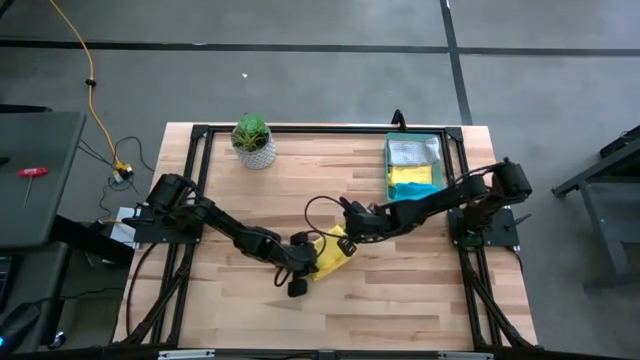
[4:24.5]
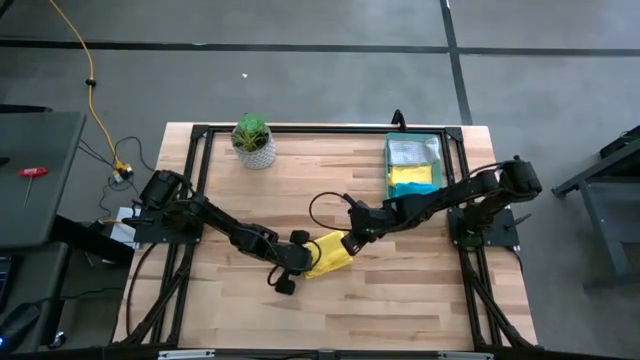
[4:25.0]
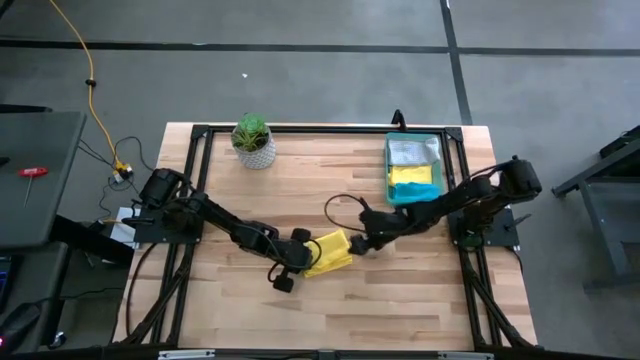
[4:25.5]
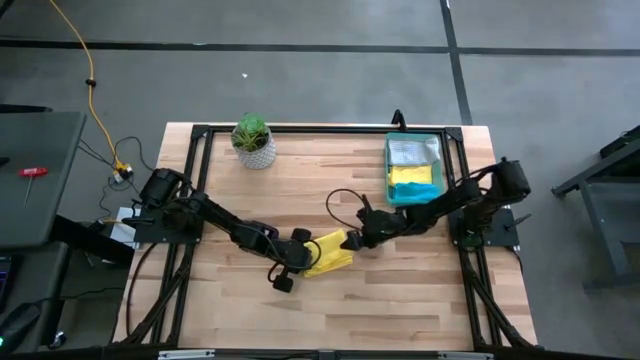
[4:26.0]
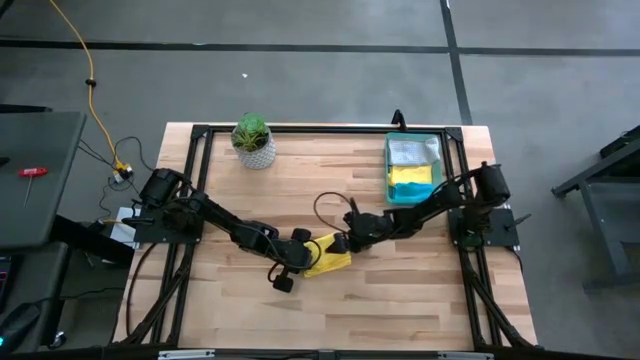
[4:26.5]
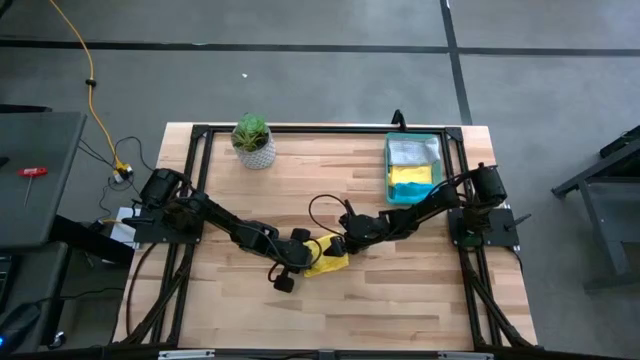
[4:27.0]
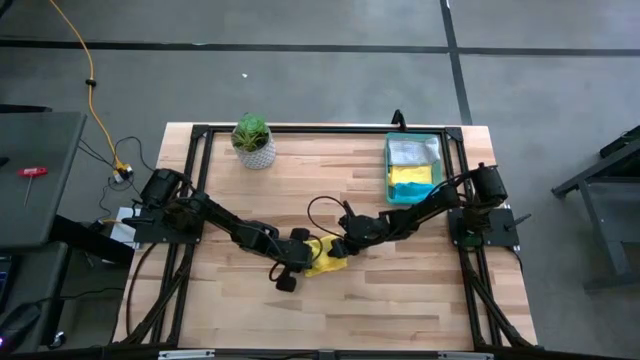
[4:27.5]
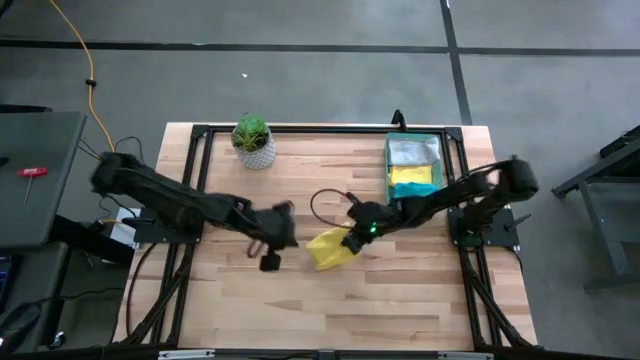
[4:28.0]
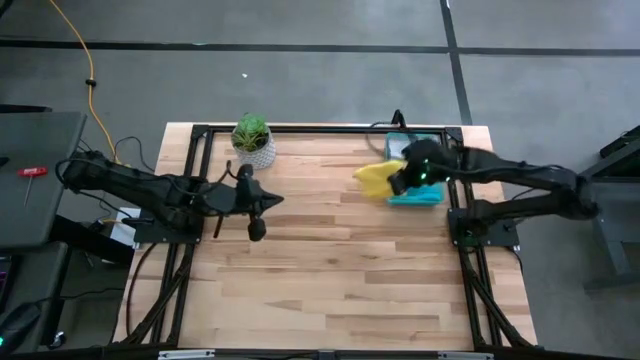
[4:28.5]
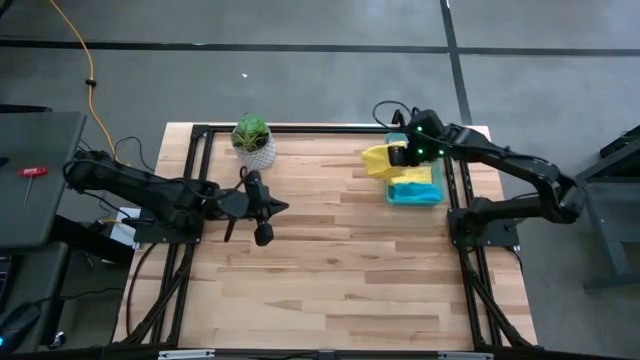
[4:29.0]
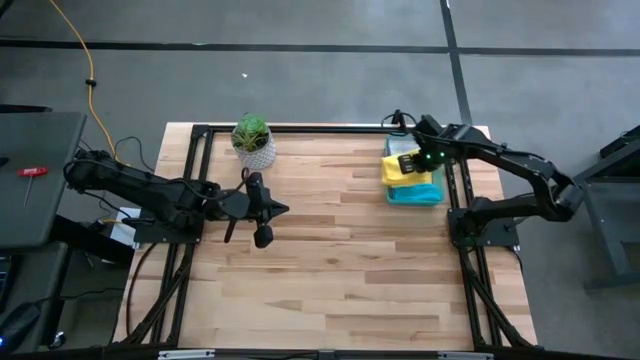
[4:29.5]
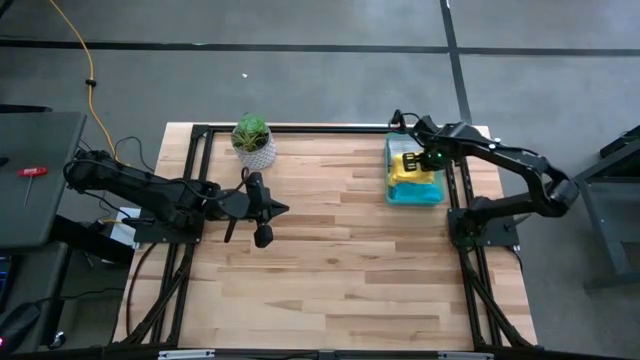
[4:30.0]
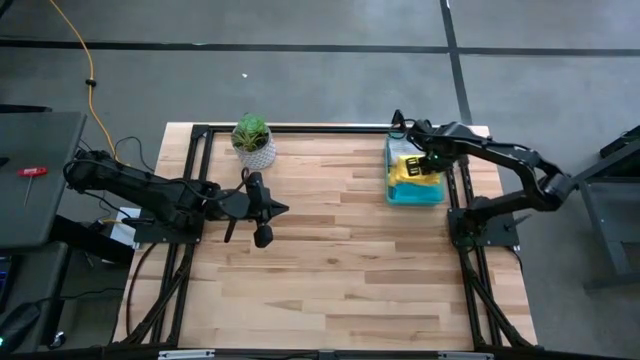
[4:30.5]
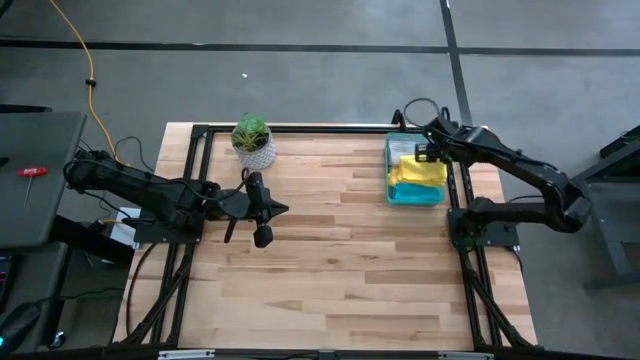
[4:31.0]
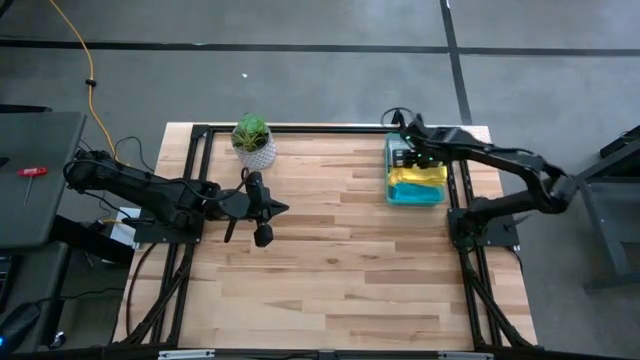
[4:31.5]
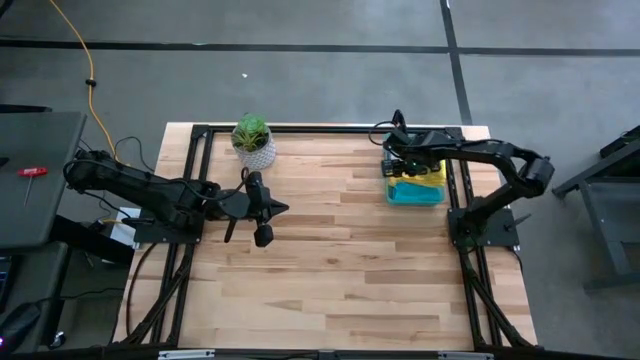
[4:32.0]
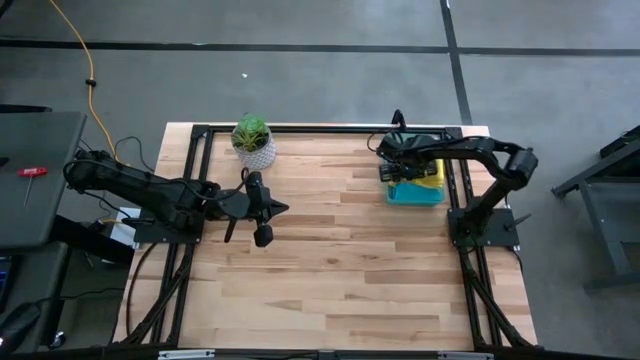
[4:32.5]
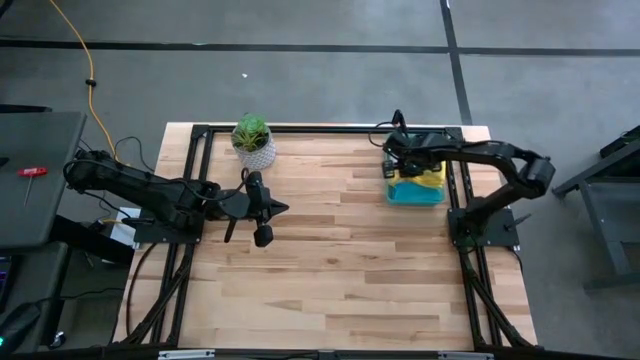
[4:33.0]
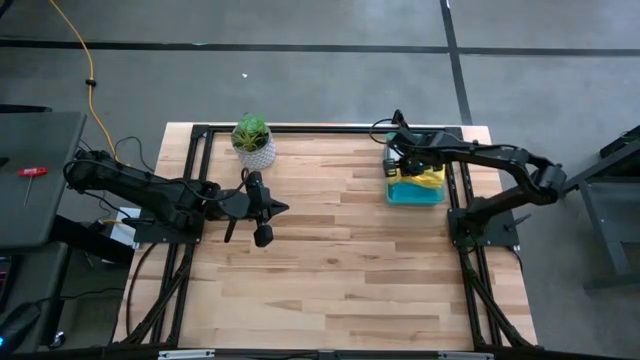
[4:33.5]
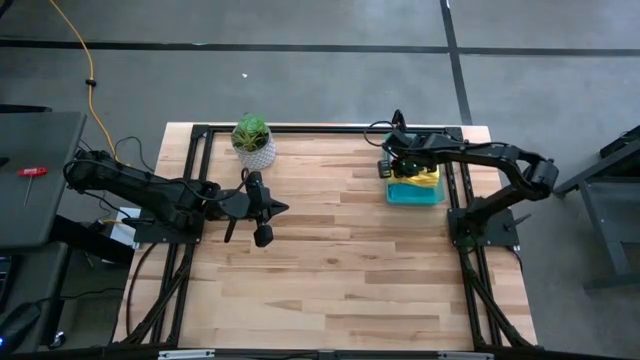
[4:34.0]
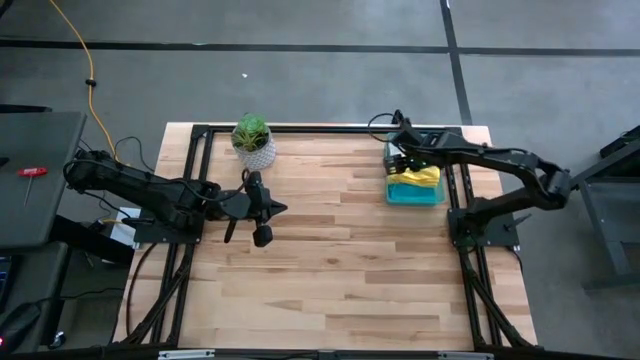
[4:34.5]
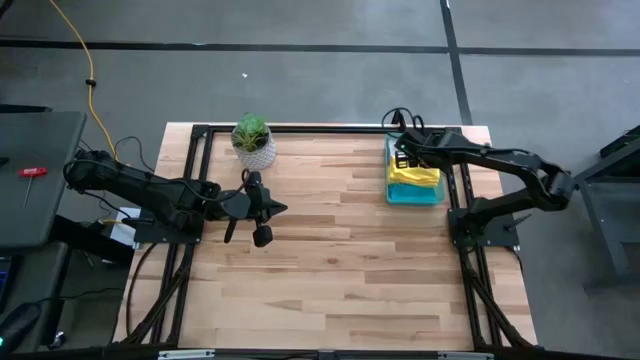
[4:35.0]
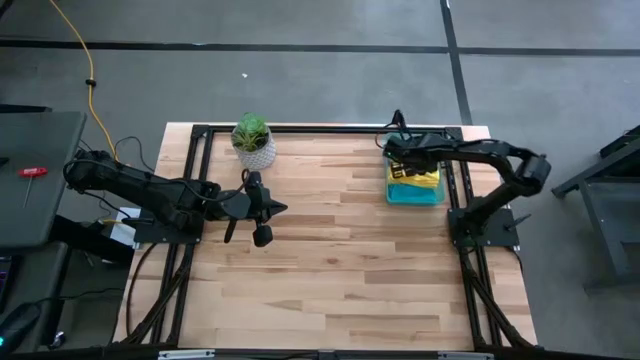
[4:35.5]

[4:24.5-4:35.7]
Task: Fold microfiber towels
Put the folded yellow microfiber cloth into the green bin

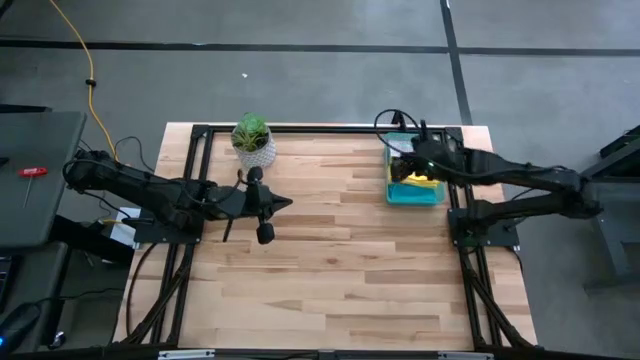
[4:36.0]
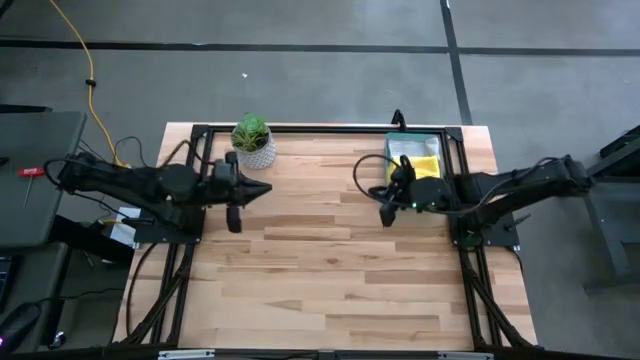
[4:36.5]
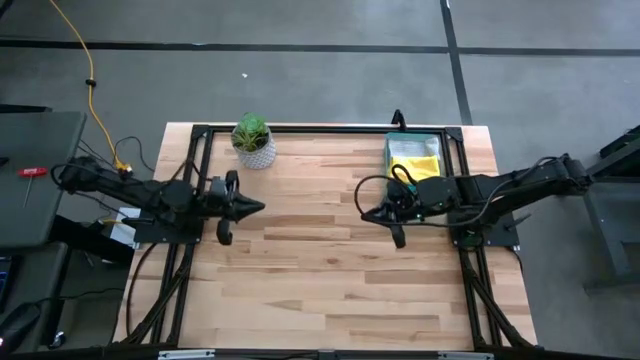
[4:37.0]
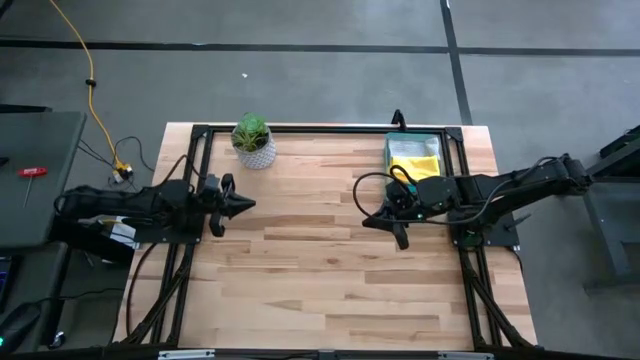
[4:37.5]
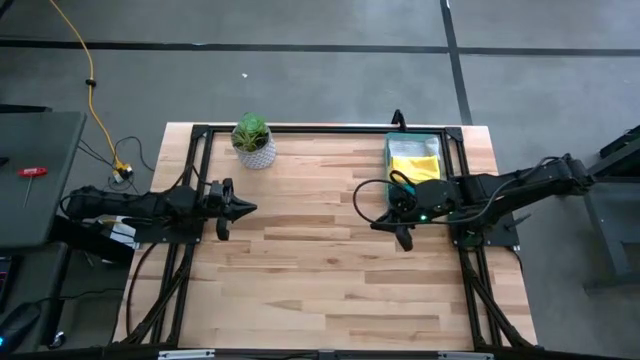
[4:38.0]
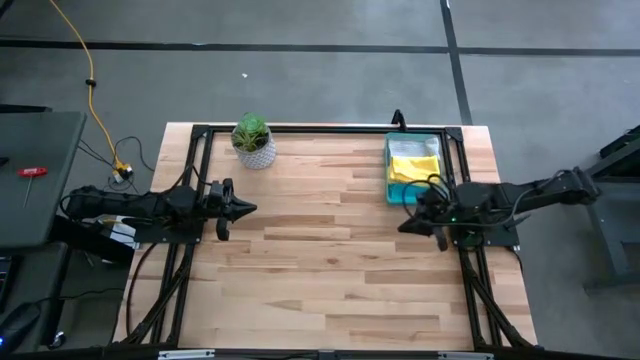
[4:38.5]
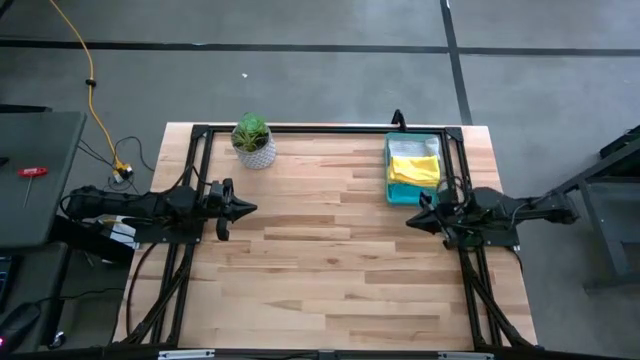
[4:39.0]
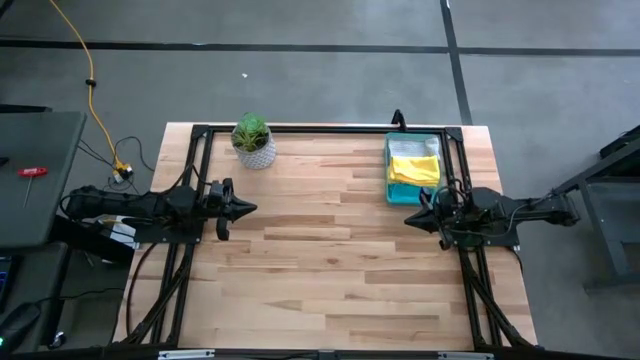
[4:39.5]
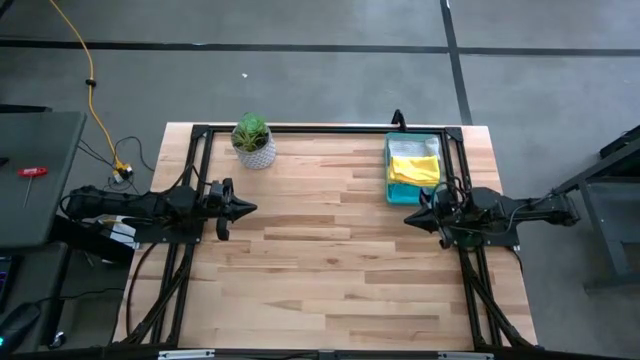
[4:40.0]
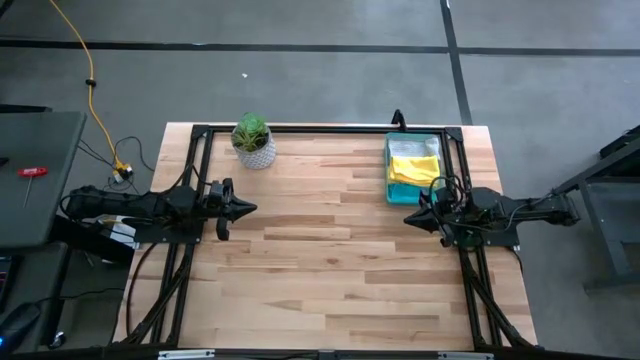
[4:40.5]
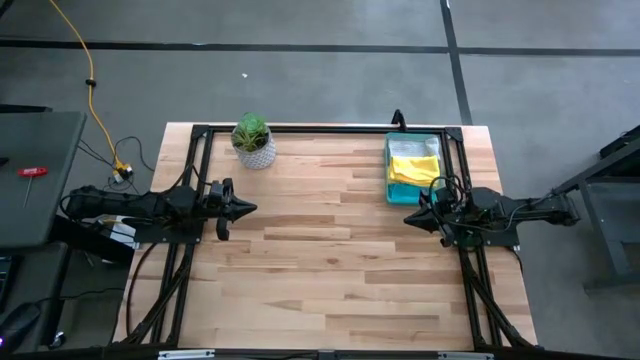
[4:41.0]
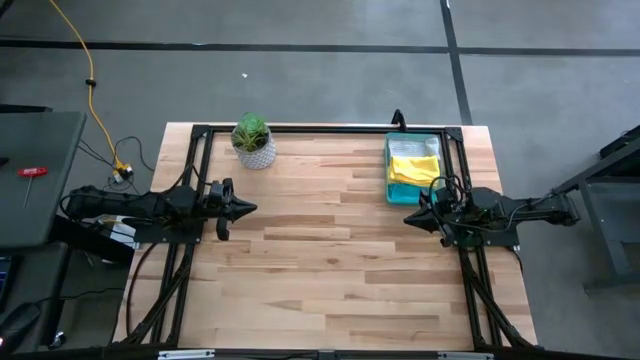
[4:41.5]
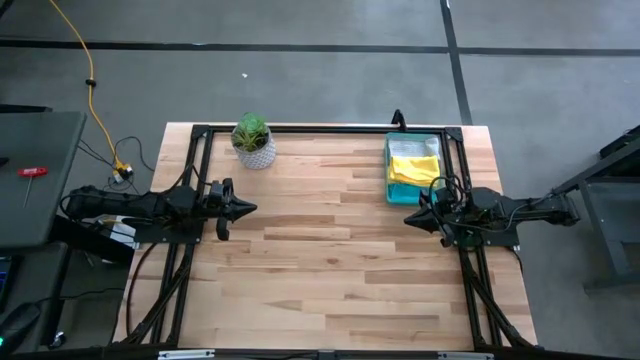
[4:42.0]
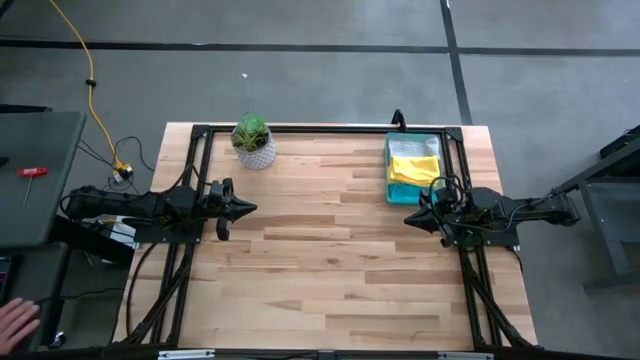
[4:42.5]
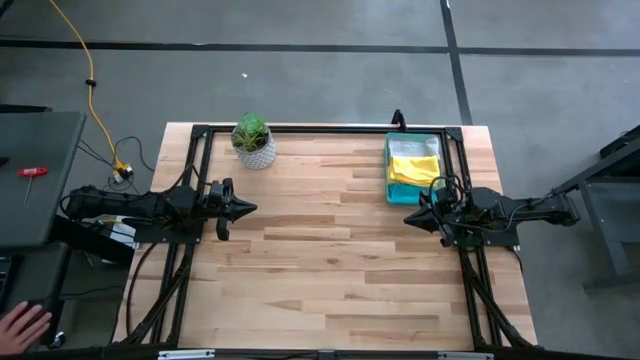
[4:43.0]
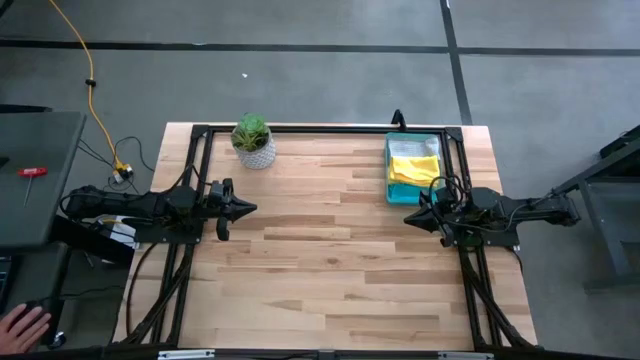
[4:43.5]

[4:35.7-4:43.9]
Return to Home Position
